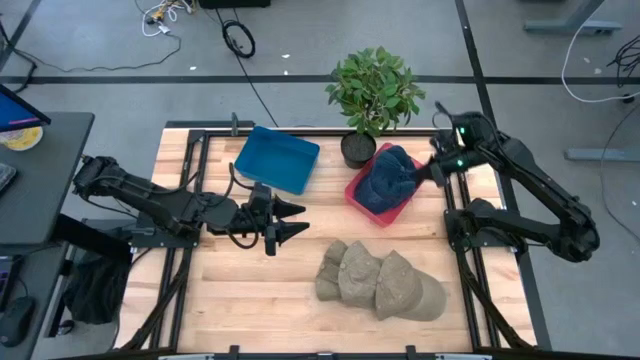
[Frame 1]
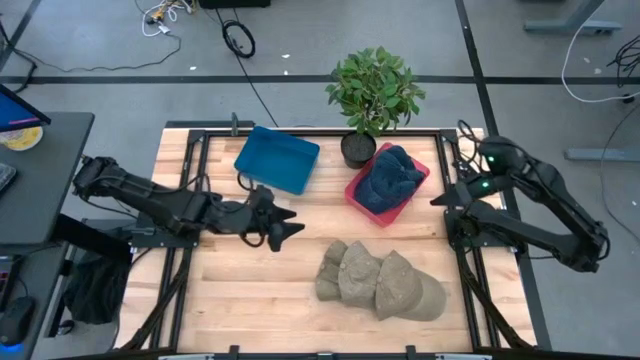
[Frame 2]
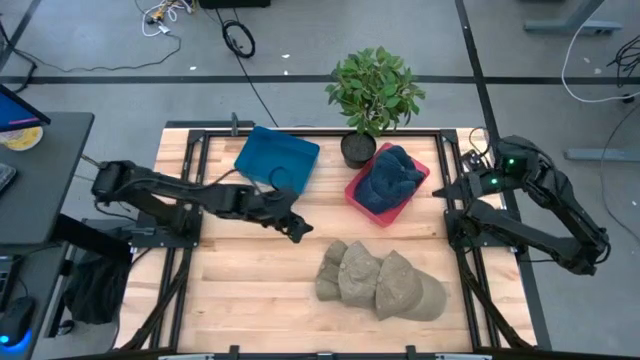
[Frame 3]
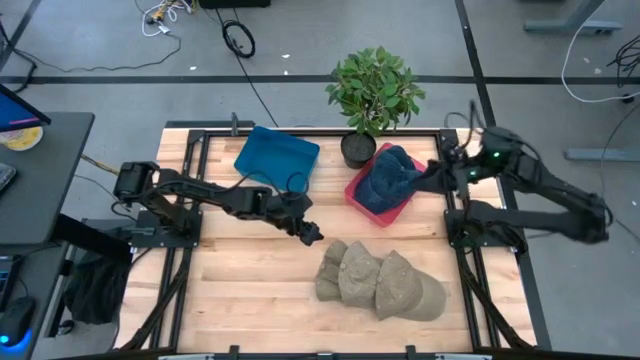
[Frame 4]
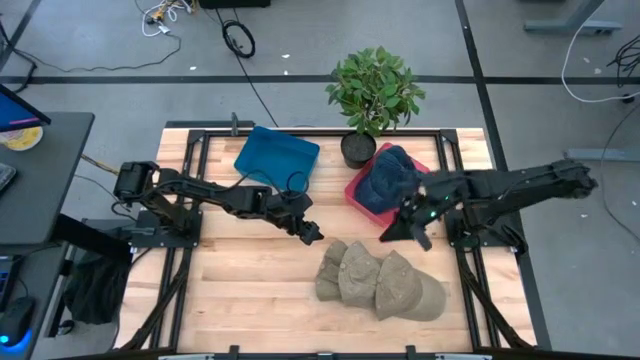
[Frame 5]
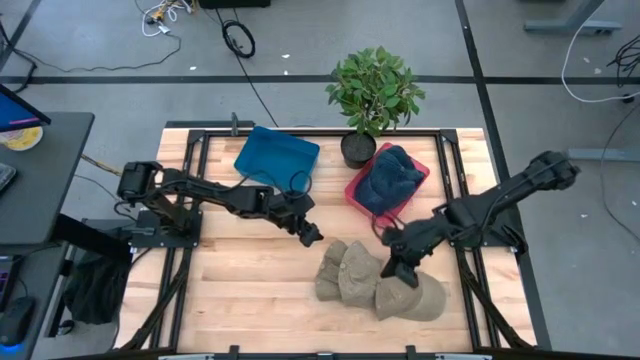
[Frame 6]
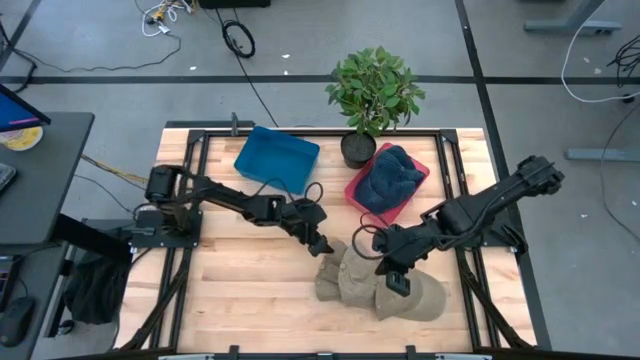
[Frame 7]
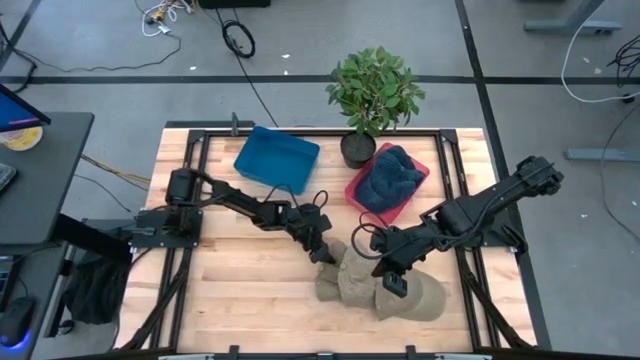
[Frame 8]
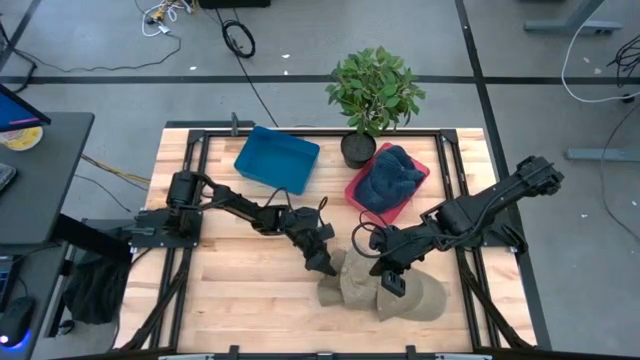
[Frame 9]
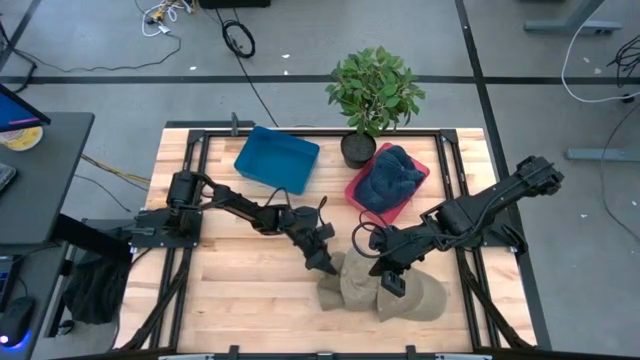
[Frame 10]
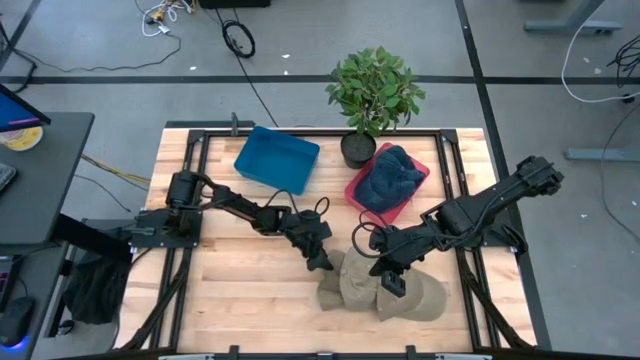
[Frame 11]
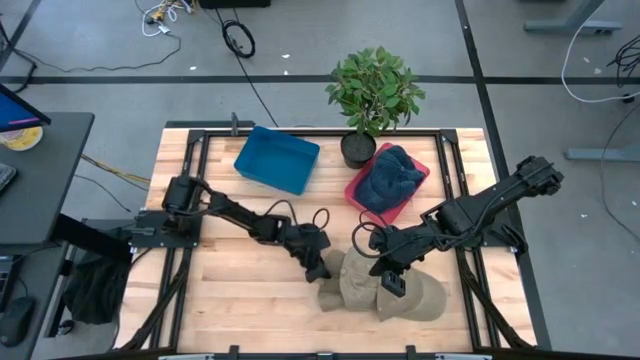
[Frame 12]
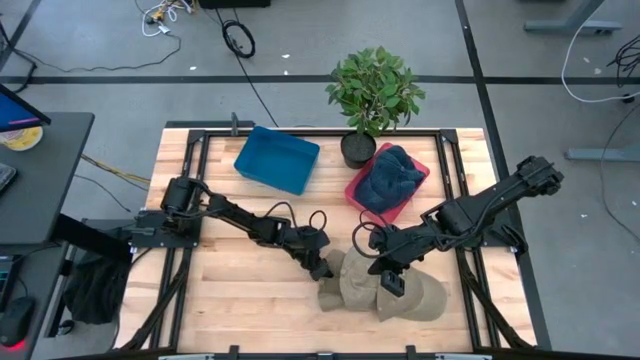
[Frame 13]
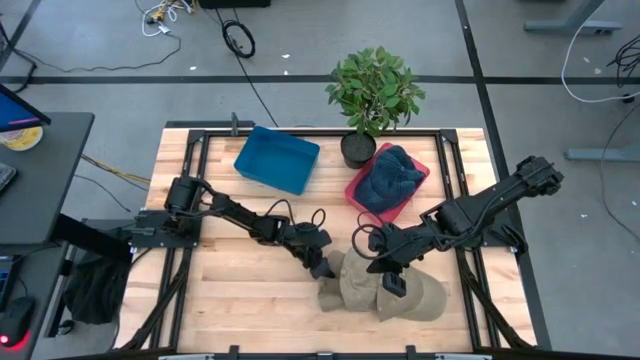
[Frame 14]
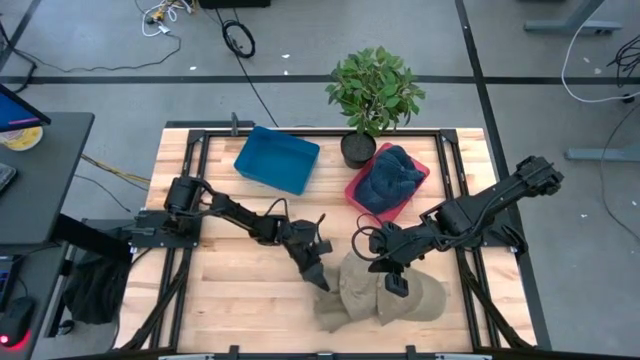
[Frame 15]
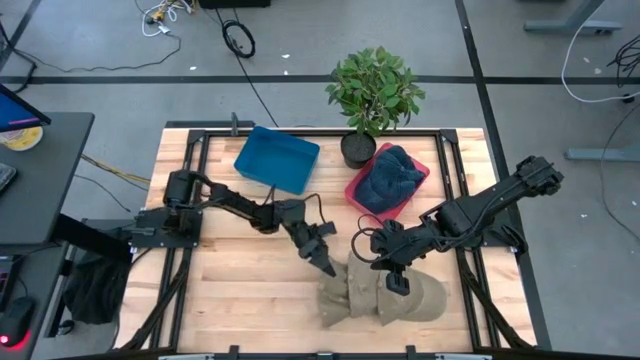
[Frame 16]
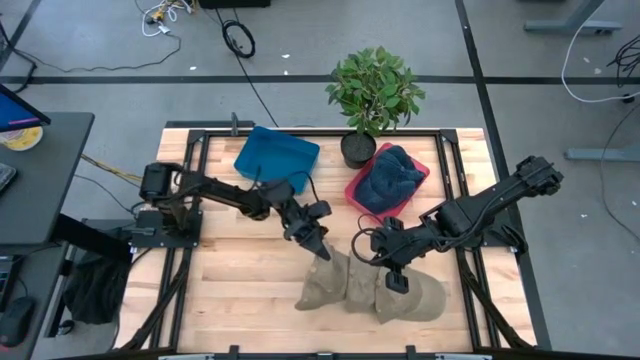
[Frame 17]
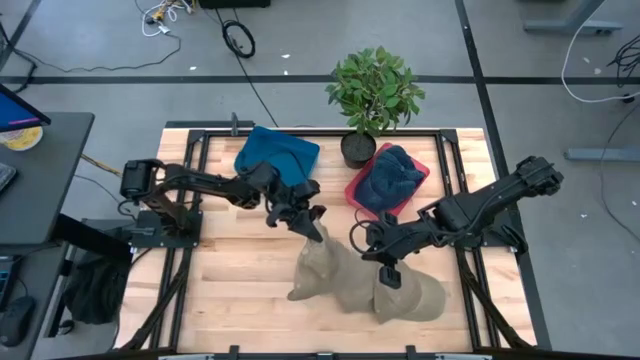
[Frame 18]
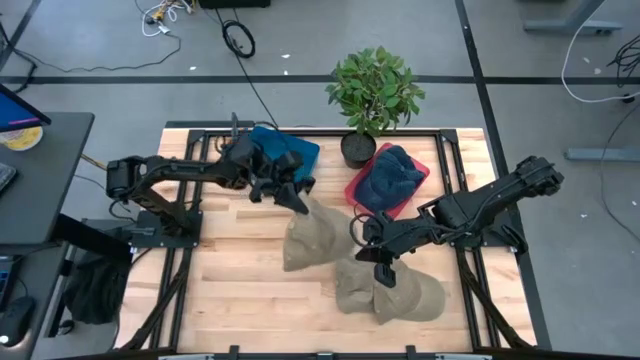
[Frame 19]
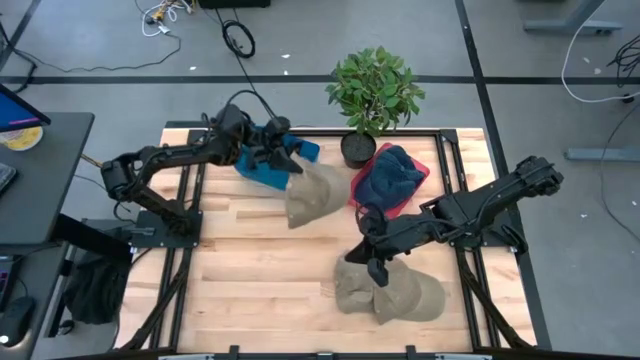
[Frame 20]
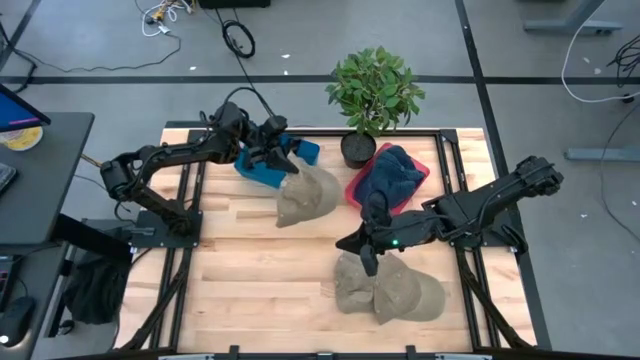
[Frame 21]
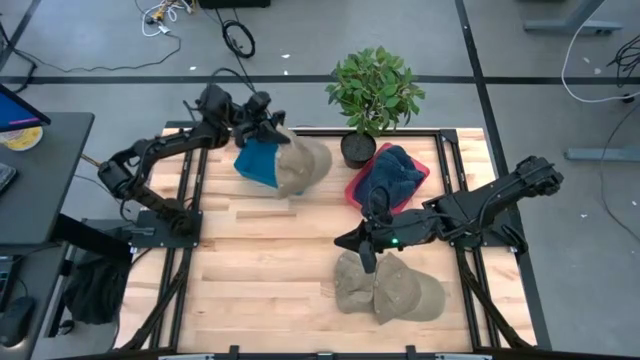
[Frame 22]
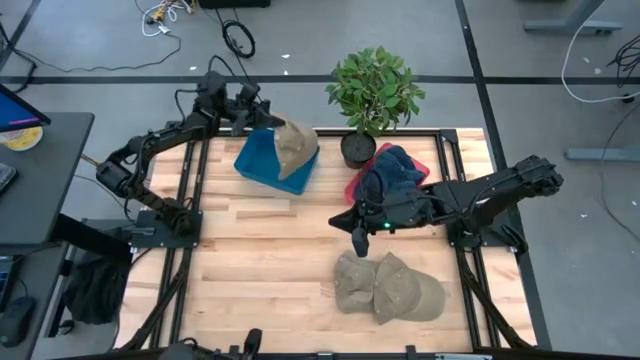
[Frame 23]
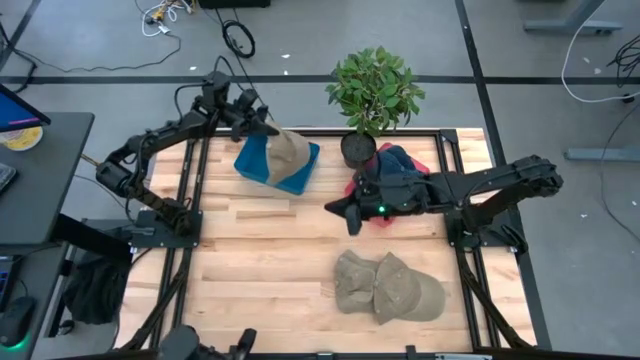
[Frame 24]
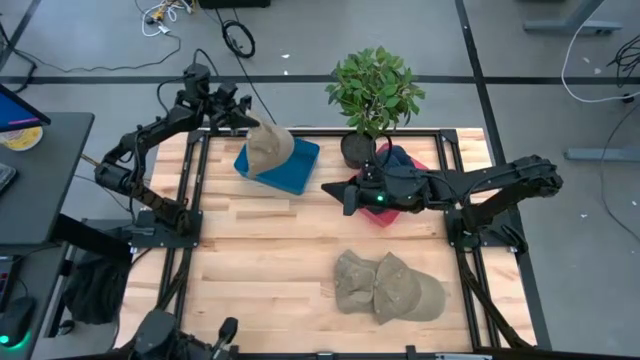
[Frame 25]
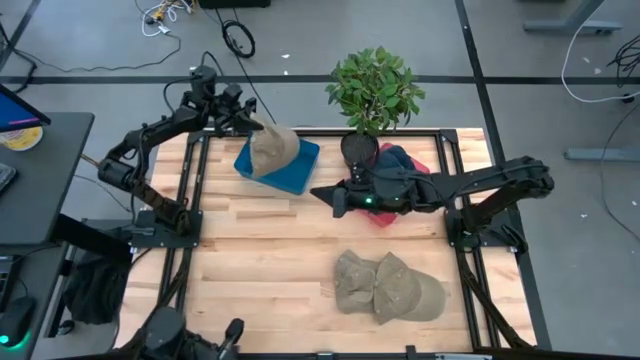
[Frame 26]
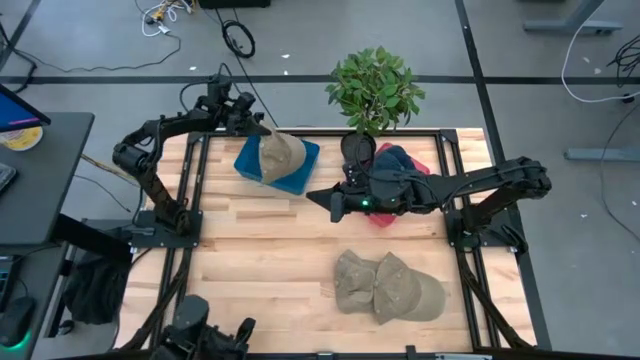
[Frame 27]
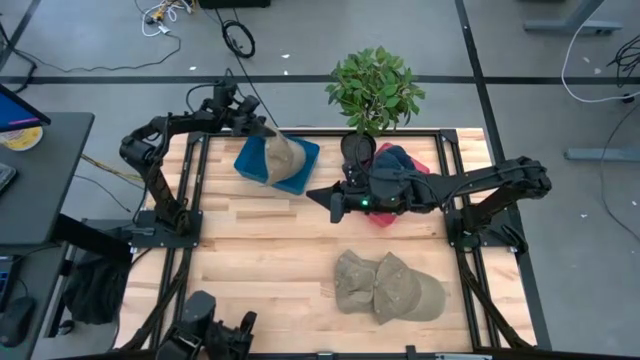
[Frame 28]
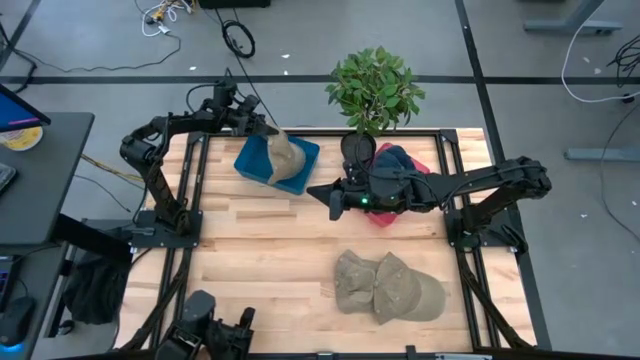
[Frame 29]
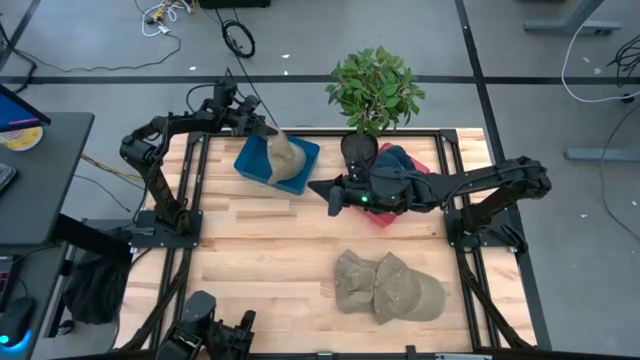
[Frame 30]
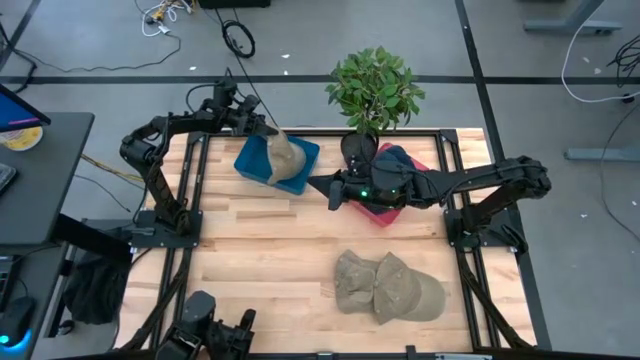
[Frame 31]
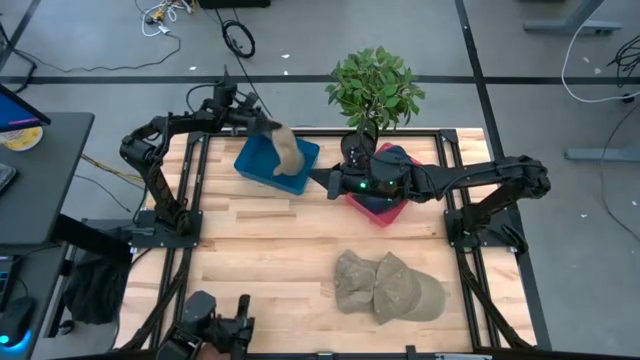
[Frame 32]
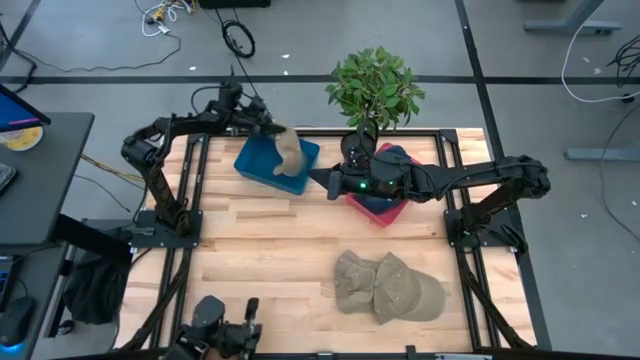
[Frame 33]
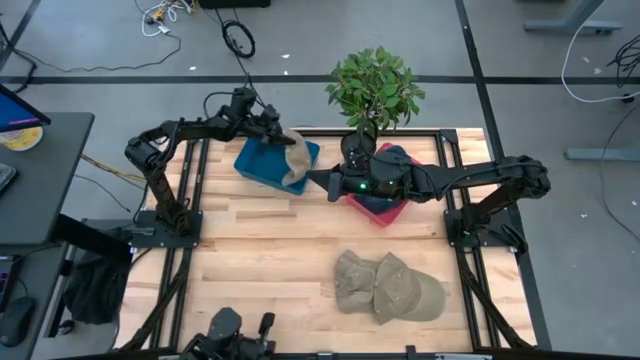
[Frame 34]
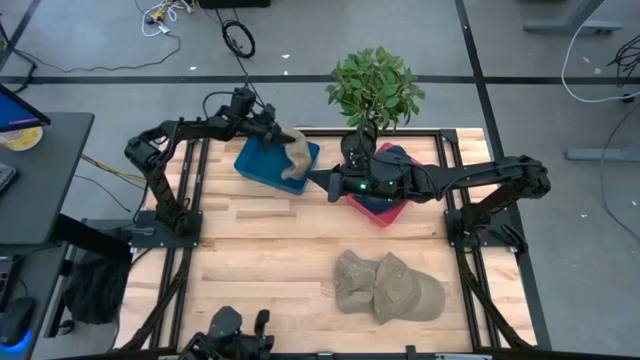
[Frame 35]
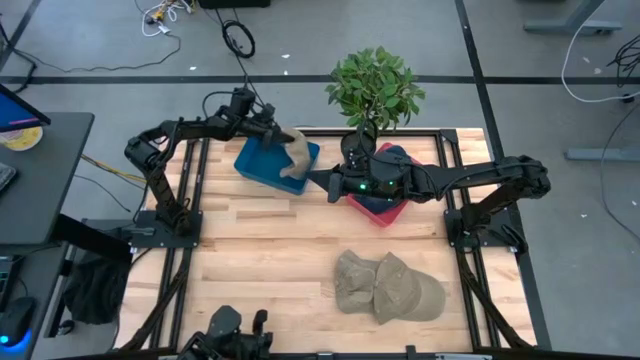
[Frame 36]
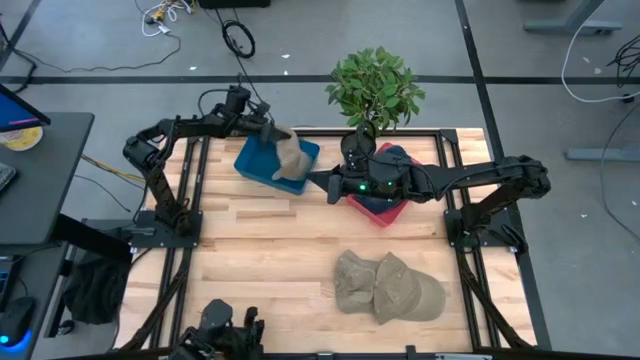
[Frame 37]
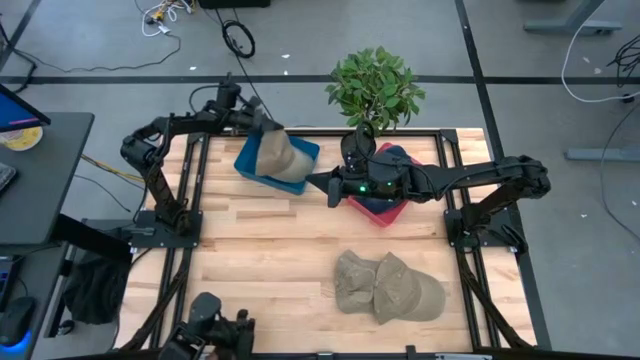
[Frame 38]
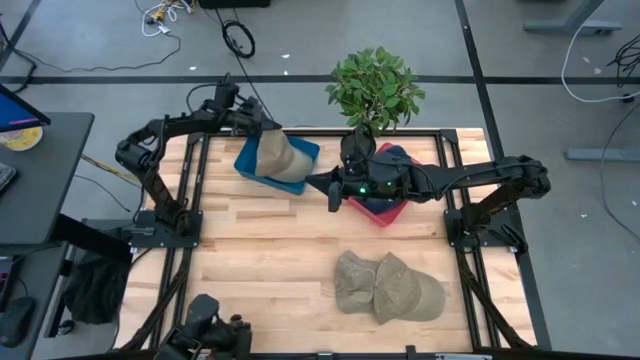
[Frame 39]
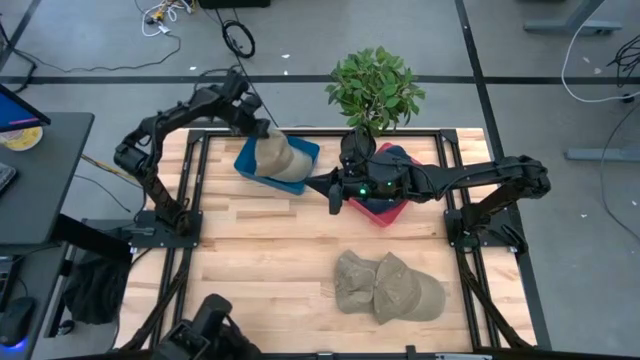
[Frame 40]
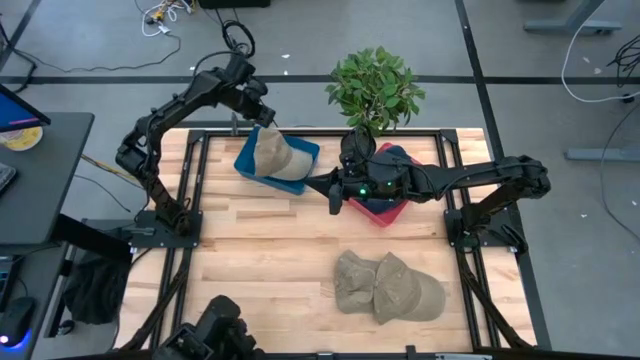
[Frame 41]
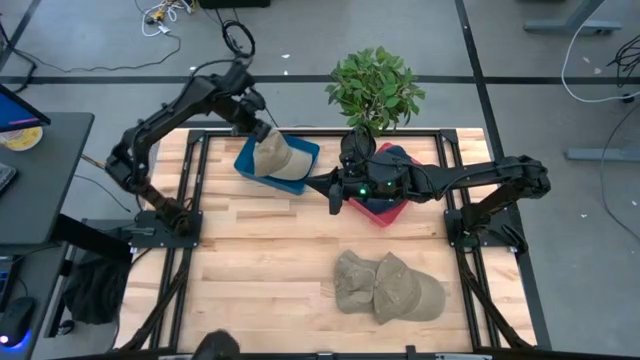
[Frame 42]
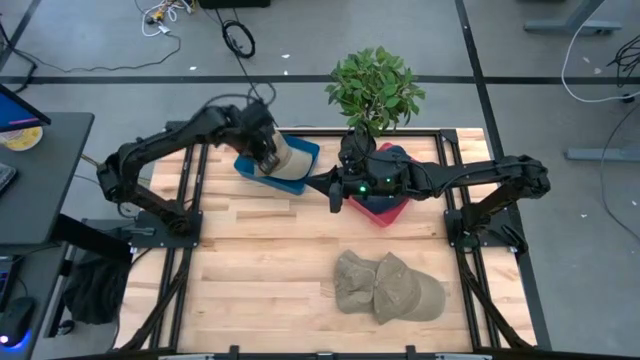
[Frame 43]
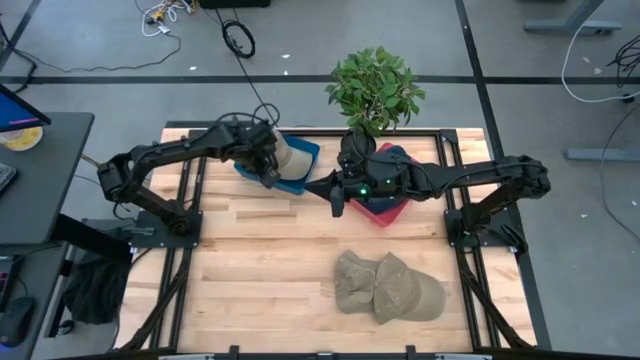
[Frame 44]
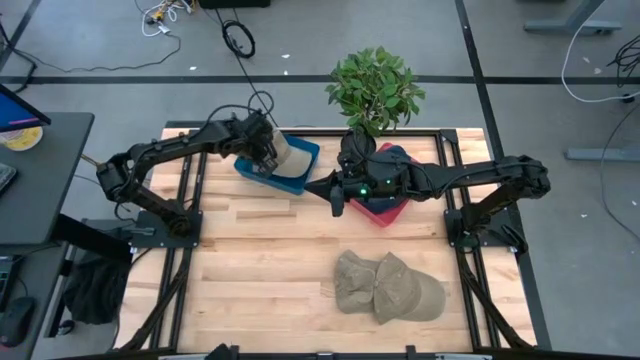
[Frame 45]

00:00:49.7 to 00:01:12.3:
Task: Pick & Place hat
Put the left brown cap into the blue bin
